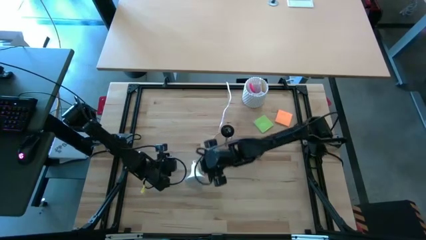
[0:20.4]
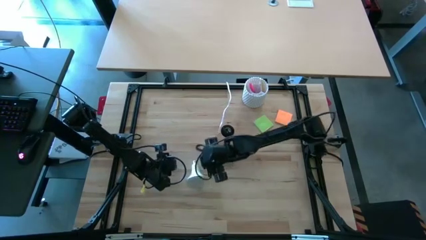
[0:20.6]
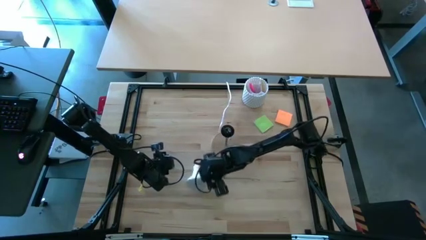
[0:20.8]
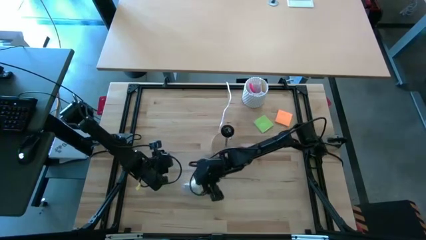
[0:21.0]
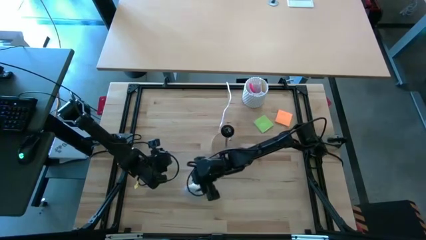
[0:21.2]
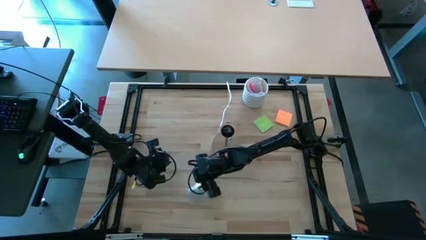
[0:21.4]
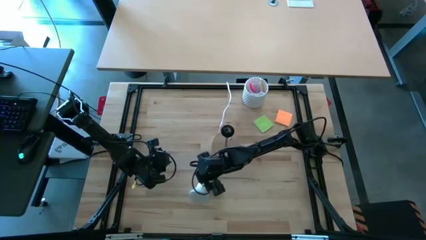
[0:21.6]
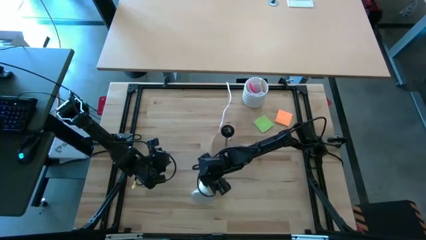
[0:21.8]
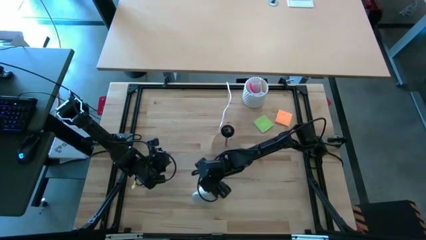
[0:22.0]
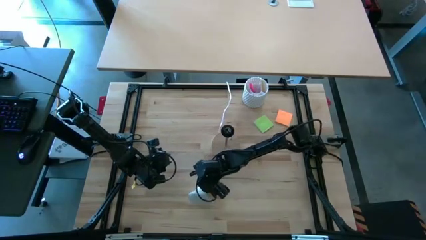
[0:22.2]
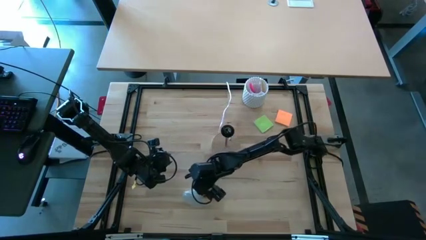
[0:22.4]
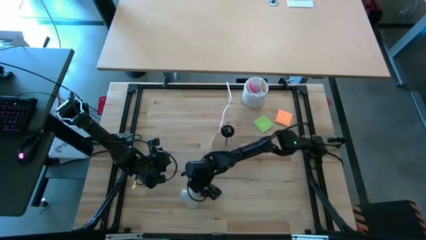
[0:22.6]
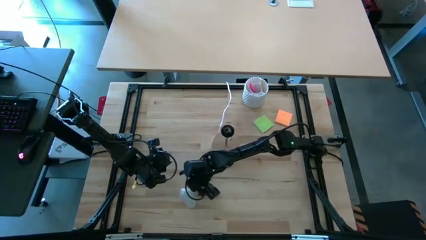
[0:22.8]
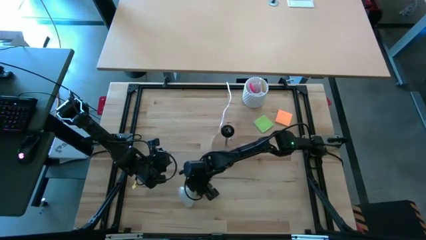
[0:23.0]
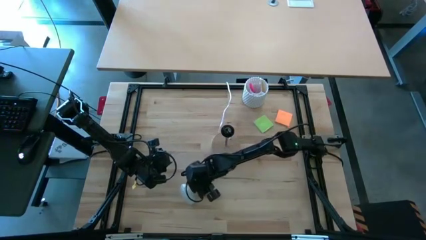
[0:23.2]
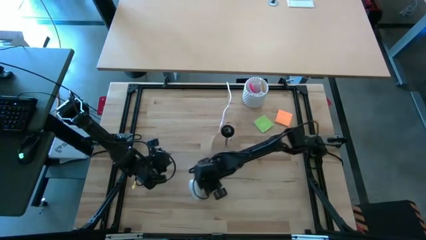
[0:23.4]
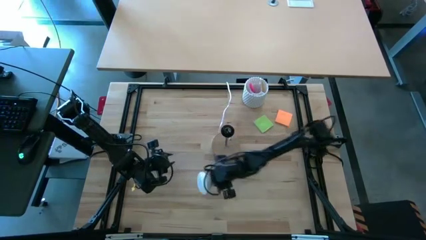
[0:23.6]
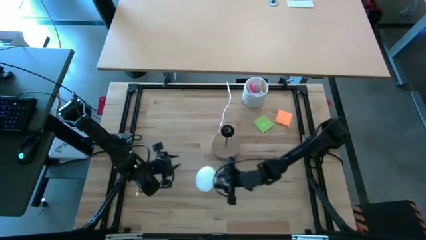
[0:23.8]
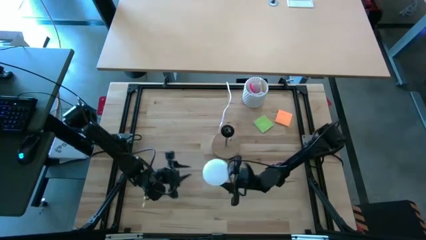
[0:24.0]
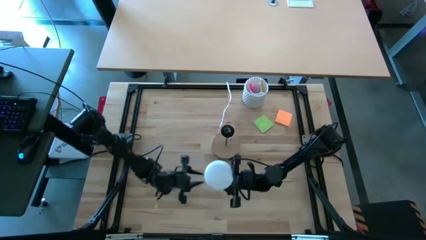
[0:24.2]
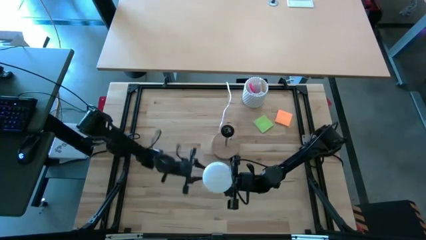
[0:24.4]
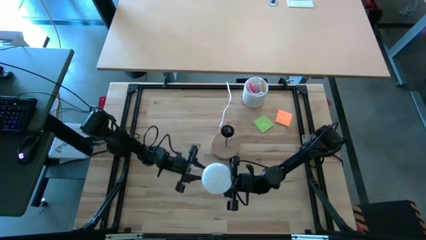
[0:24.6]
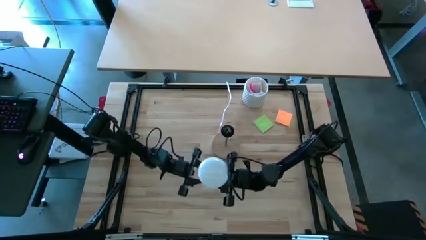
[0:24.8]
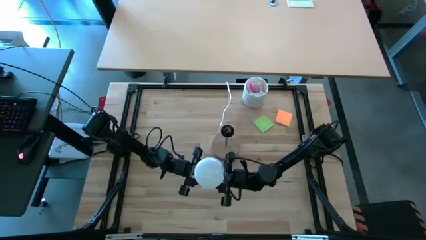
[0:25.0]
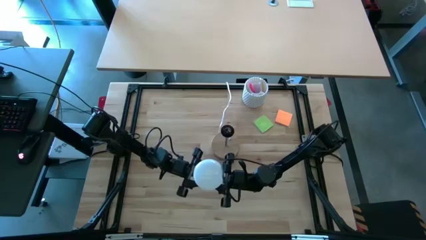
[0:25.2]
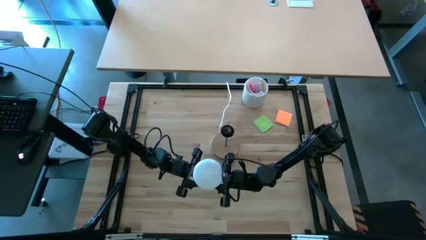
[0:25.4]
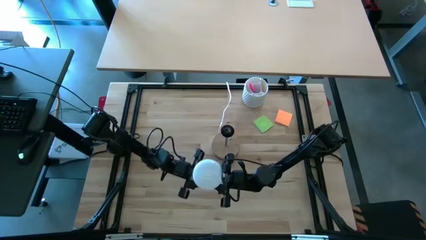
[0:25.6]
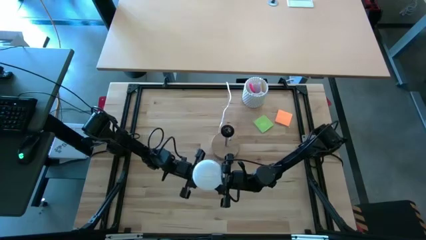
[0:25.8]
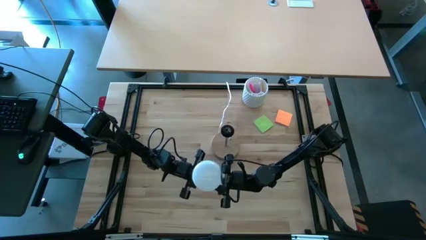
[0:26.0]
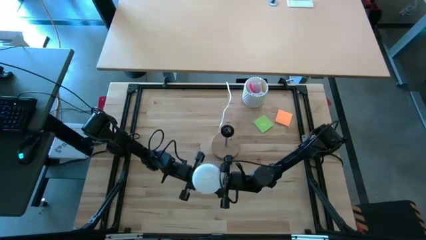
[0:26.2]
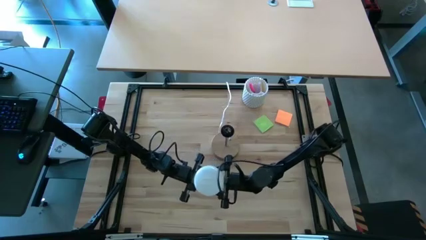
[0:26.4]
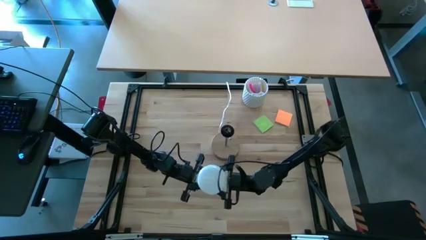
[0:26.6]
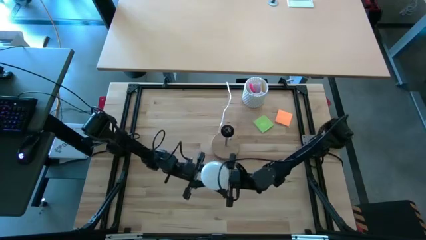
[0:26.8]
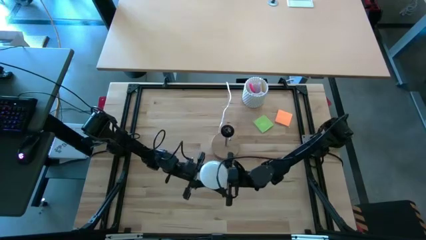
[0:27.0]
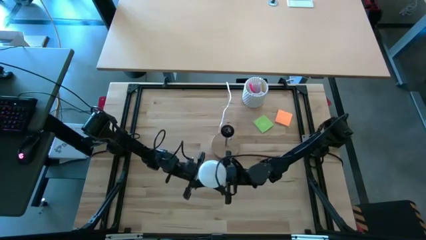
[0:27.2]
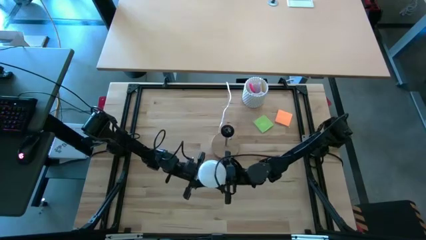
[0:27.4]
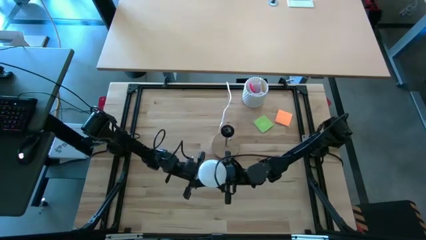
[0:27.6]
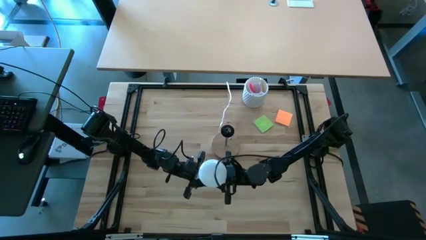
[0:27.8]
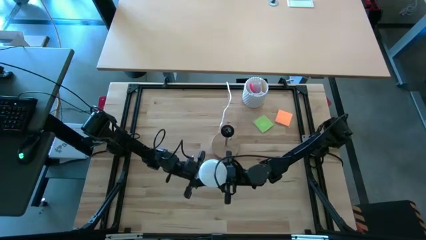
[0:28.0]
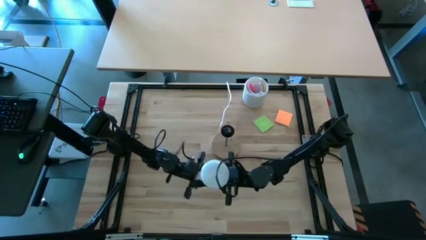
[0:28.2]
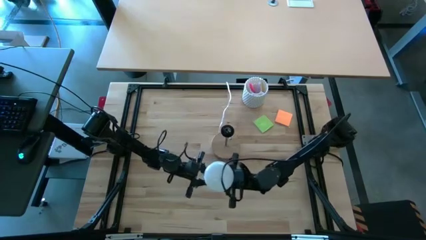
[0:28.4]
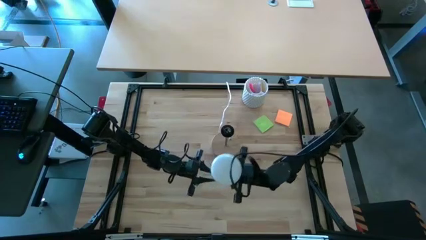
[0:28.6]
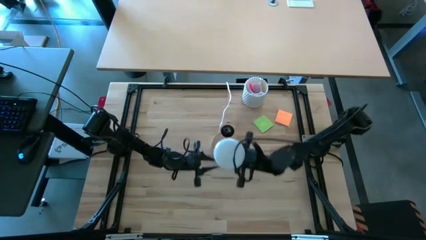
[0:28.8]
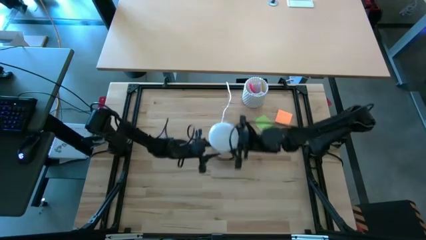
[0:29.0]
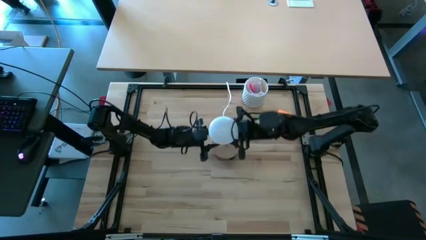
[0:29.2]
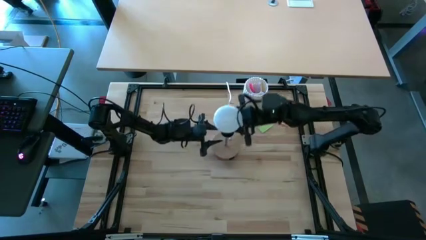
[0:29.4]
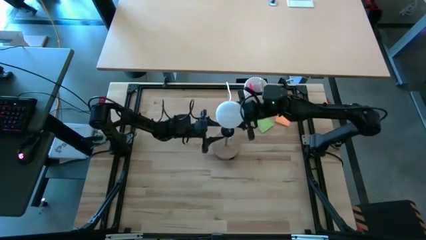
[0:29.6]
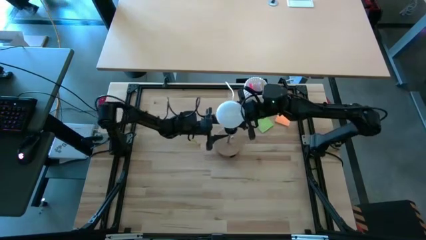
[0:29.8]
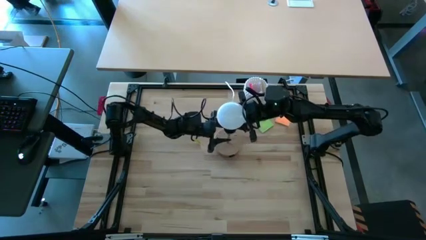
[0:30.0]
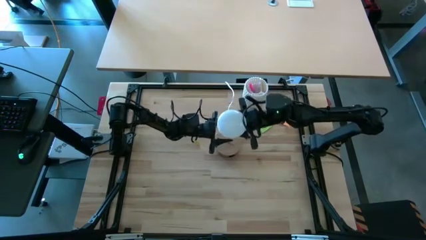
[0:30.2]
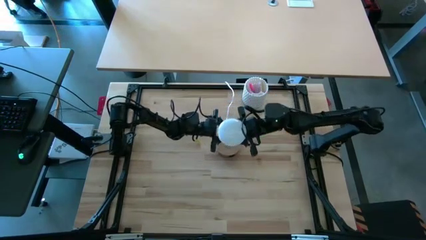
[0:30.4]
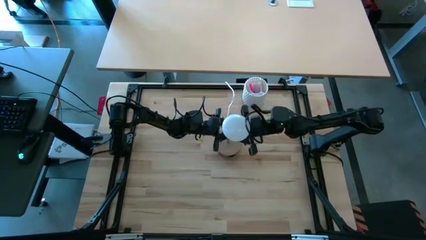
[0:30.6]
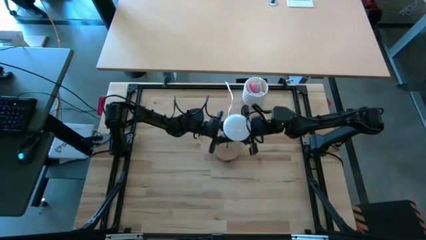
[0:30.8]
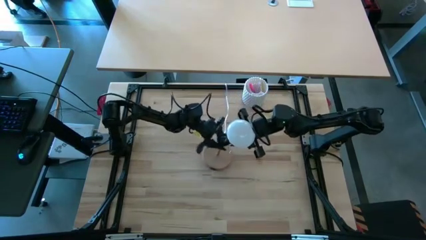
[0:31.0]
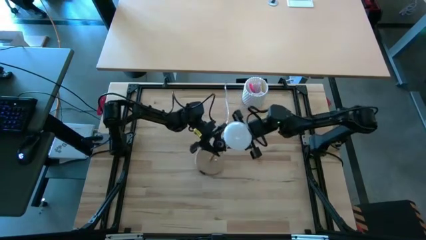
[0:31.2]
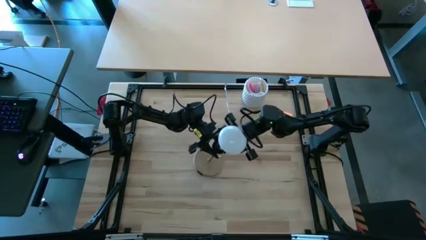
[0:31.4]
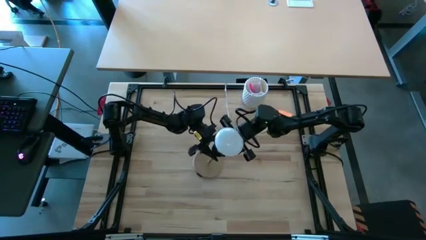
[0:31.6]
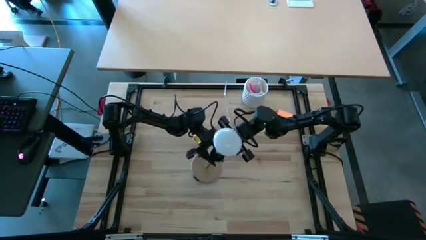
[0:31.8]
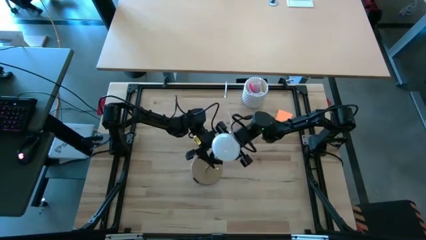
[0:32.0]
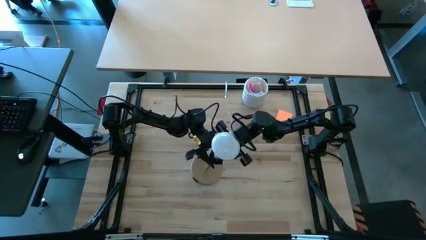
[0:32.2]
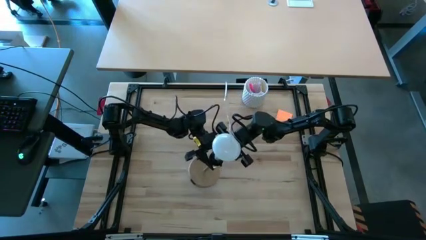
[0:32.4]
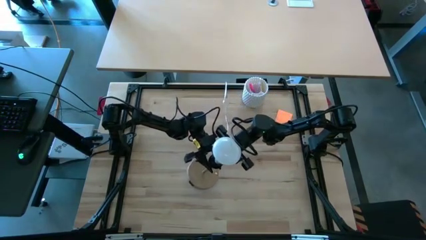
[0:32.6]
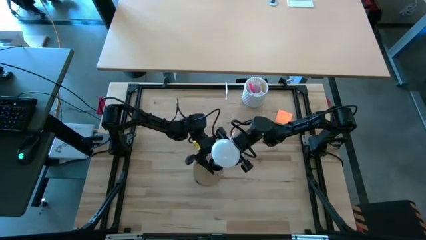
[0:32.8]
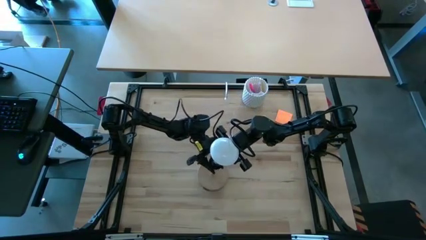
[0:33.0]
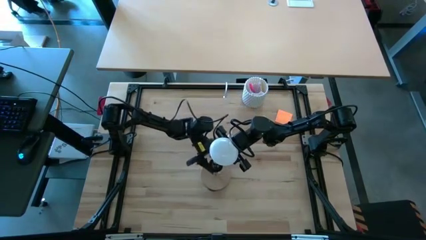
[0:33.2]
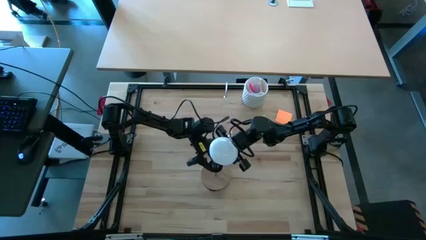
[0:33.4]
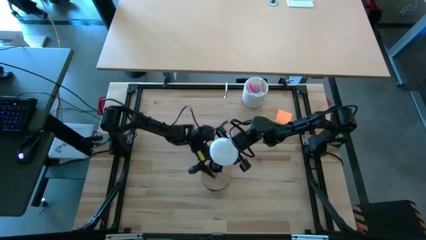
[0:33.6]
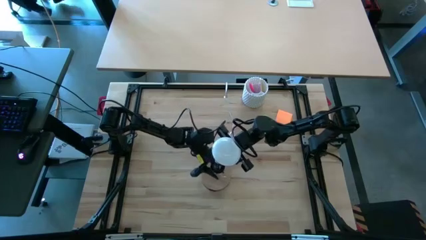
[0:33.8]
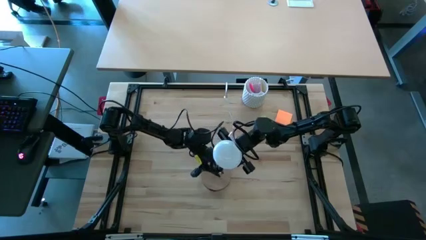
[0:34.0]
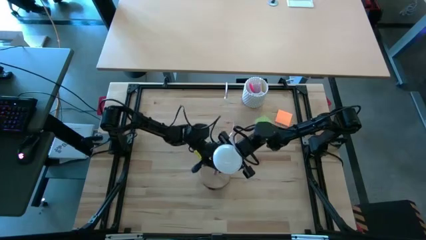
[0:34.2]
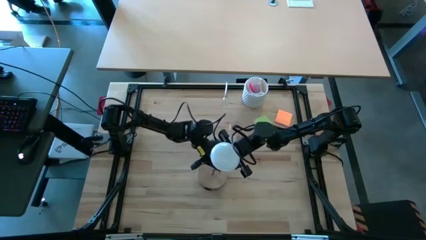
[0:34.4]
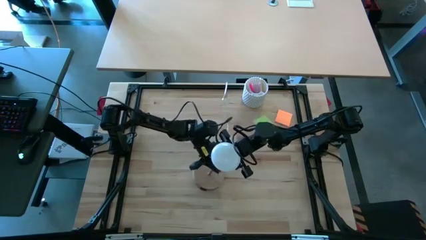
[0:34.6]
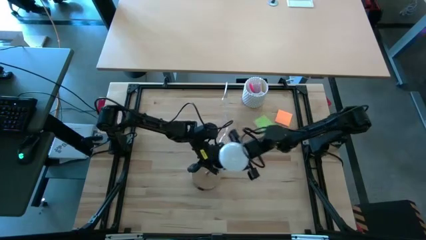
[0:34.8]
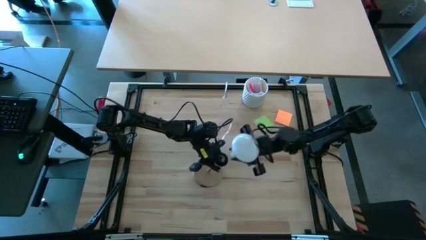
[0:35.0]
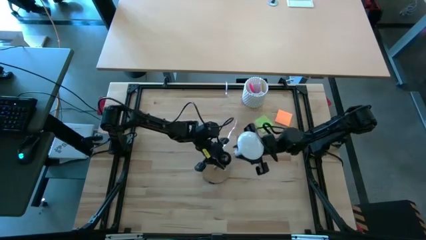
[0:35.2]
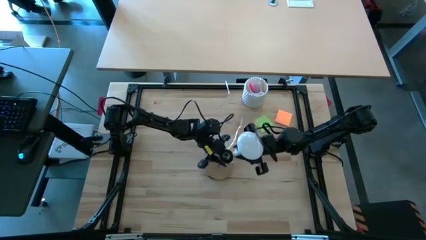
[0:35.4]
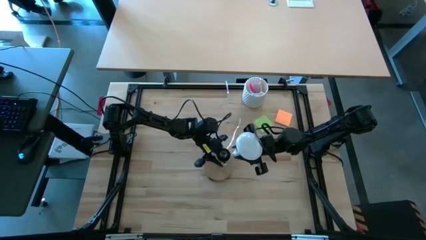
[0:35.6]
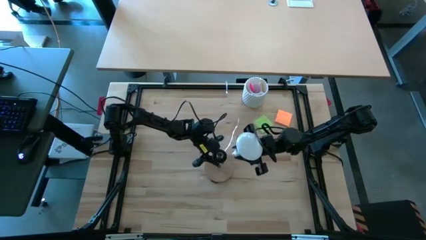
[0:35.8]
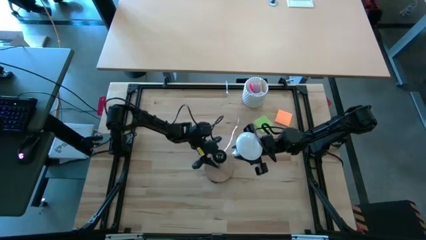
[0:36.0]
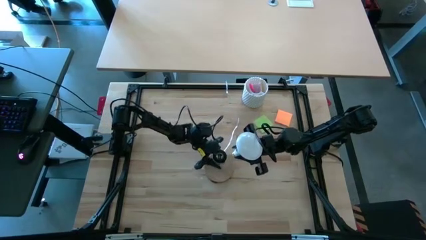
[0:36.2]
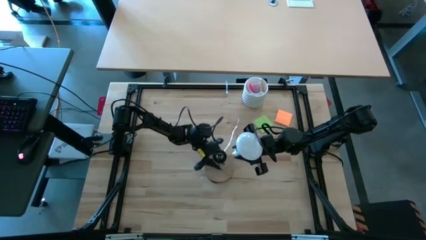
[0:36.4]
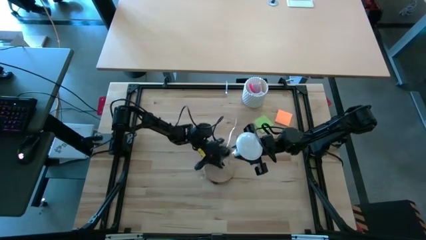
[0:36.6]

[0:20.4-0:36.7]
Task: Screw lightbulb
Insert the white lightbulb into the brown lamp
